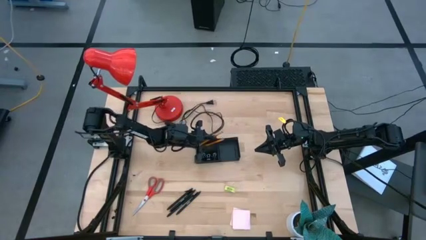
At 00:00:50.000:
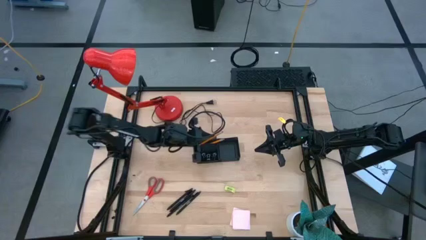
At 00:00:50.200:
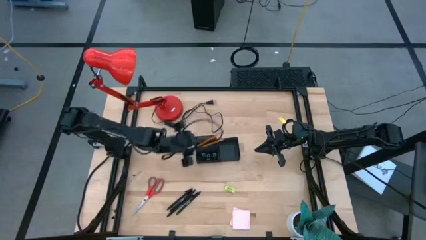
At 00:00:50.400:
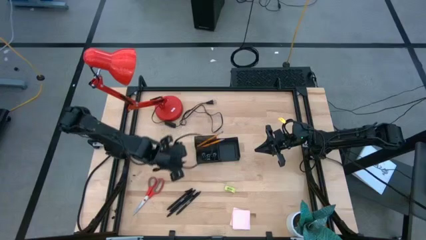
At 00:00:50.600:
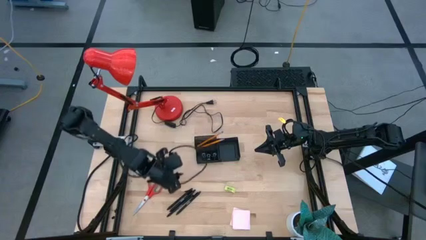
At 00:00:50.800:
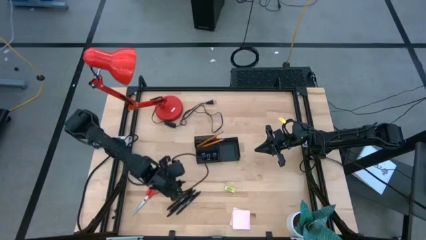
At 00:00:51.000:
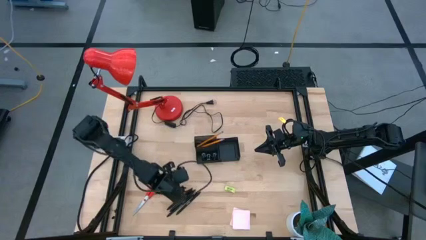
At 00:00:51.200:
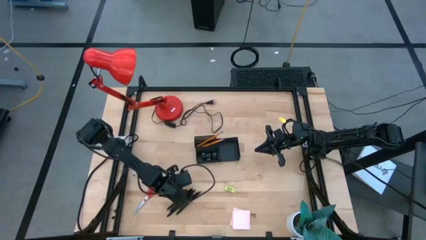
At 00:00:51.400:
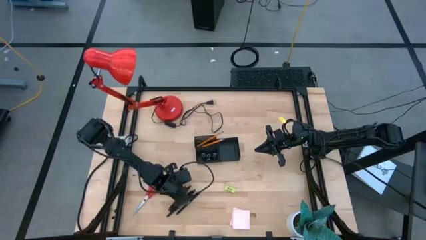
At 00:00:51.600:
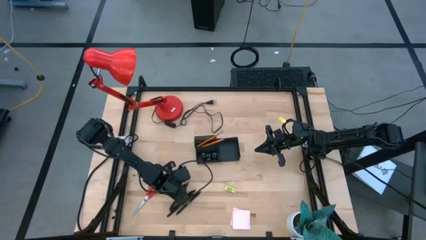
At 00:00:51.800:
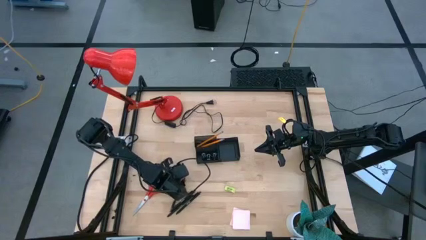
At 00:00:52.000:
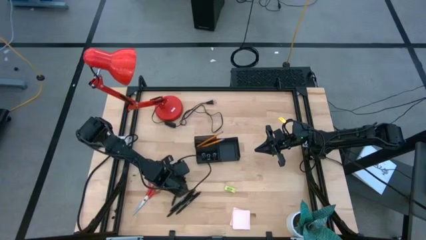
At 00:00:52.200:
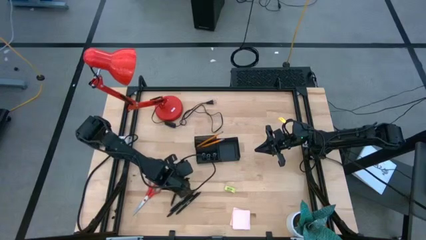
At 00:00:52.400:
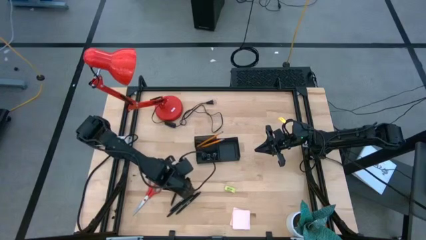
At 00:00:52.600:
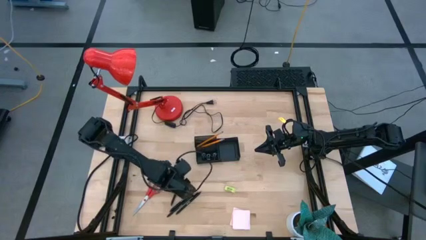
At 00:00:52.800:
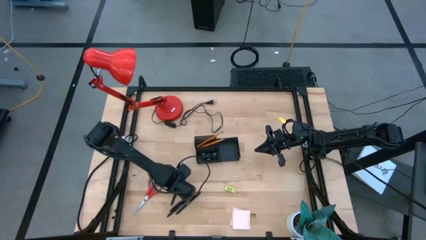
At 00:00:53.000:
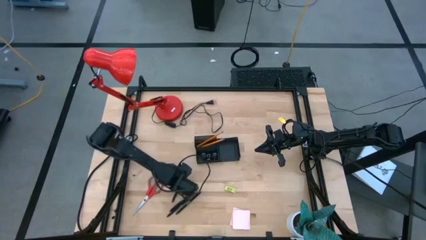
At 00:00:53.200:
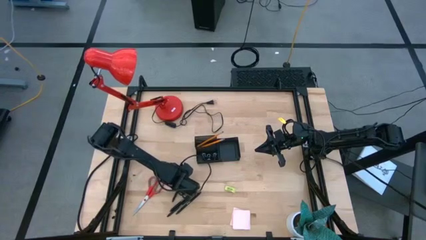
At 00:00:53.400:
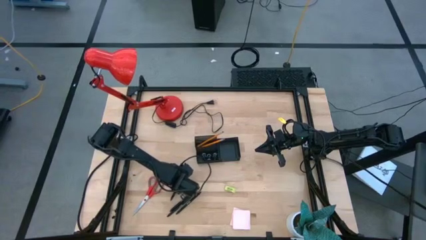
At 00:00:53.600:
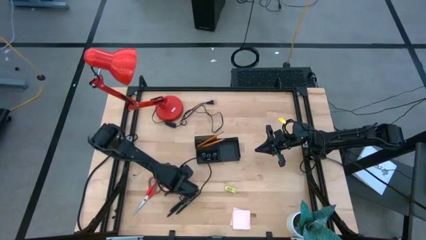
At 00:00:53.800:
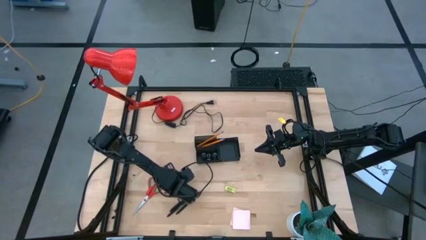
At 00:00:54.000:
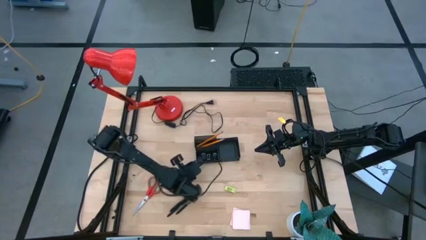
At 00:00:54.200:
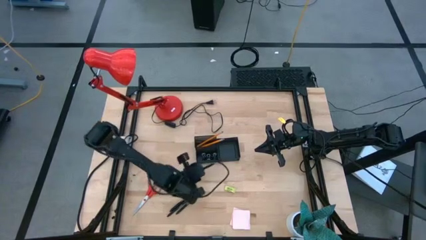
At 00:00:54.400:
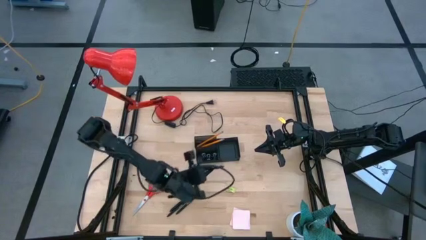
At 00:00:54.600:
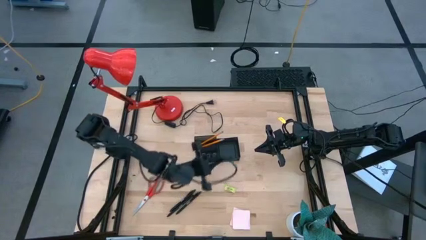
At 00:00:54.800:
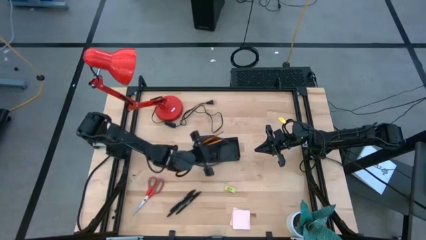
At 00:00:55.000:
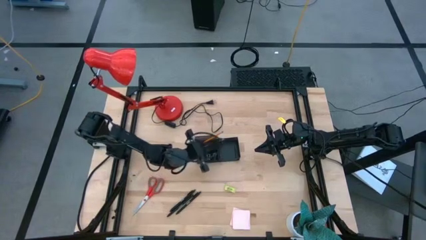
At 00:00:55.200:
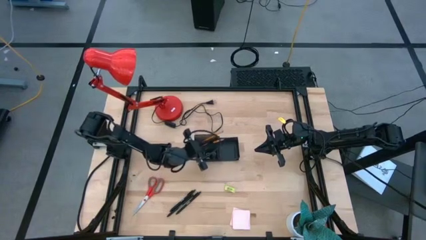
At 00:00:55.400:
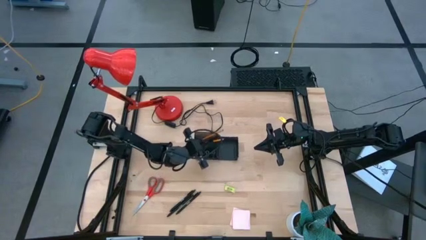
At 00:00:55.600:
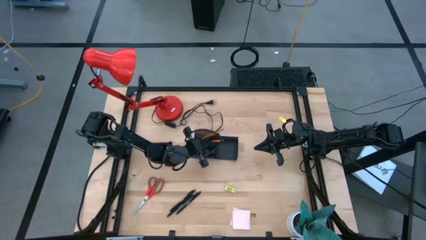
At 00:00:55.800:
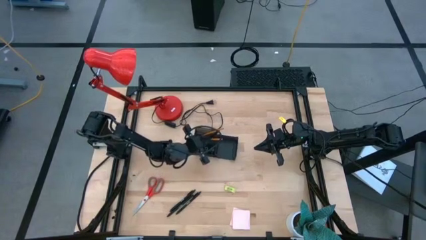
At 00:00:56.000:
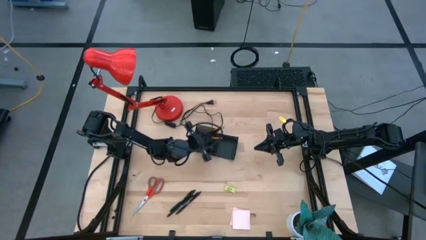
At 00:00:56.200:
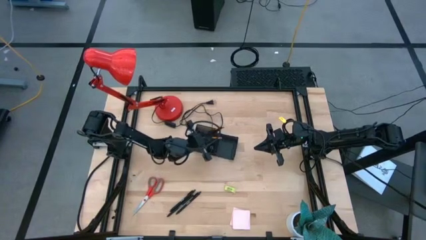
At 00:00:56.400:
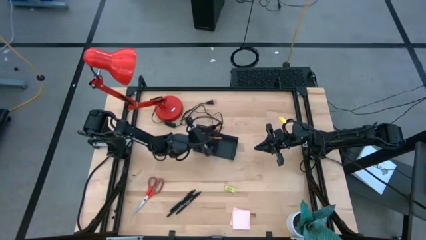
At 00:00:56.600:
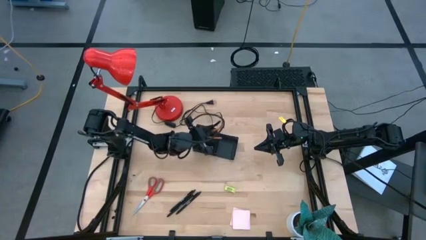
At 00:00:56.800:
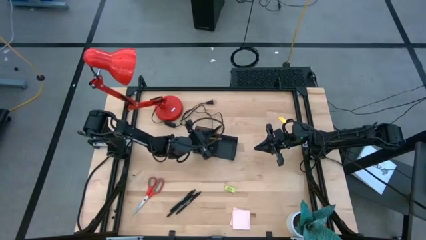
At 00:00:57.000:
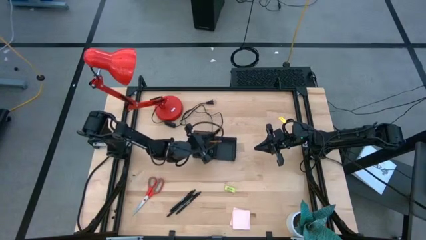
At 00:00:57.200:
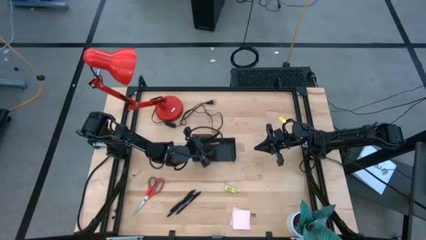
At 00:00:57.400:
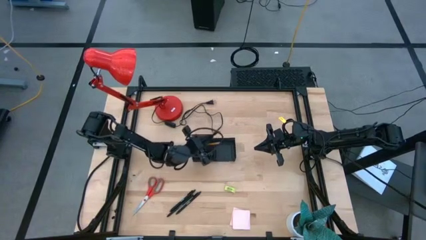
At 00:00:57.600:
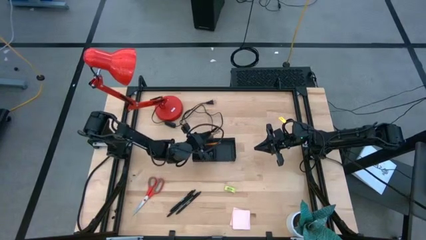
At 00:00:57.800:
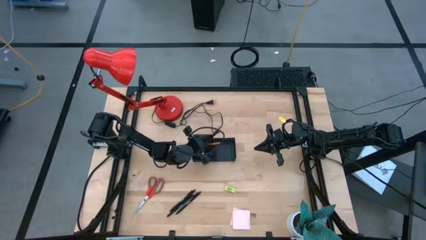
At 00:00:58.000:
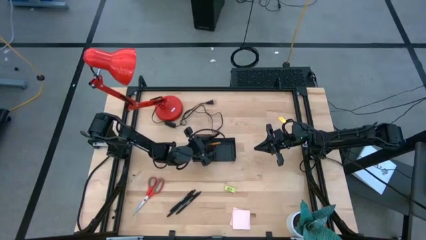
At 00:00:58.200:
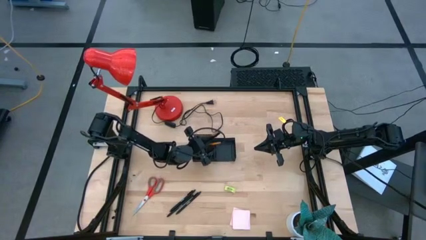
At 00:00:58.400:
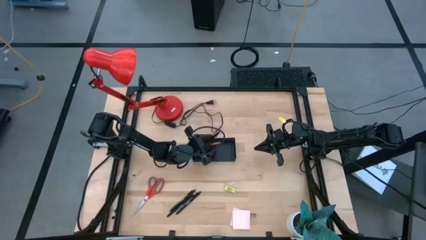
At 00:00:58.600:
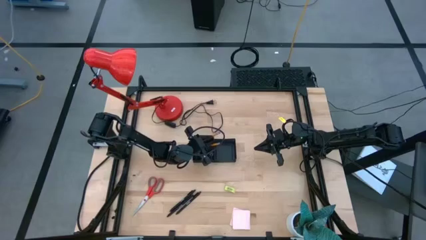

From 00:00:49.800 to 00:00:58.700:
Task: Pick and place office supplies into organizer
Put the black pen into the desk organizer

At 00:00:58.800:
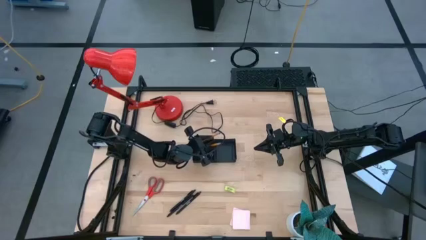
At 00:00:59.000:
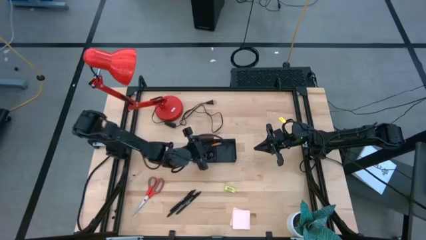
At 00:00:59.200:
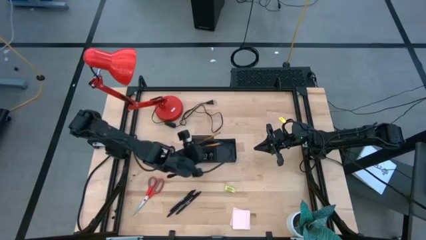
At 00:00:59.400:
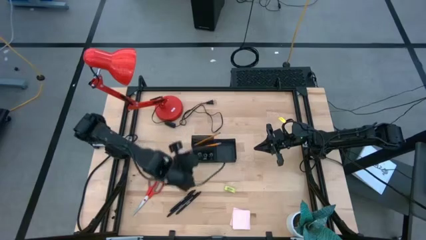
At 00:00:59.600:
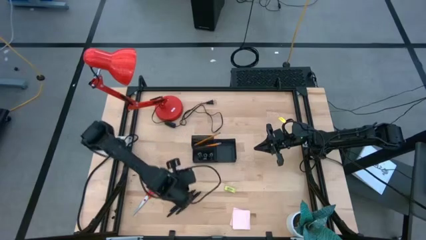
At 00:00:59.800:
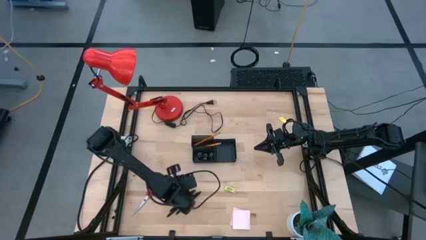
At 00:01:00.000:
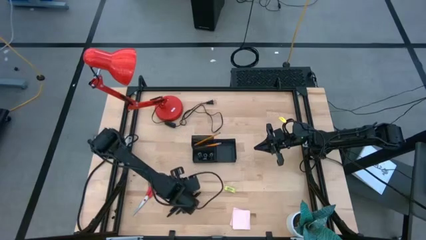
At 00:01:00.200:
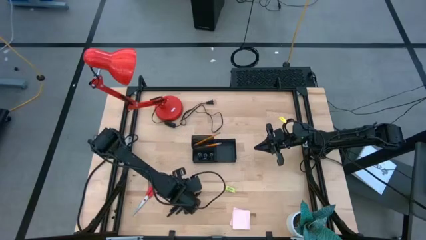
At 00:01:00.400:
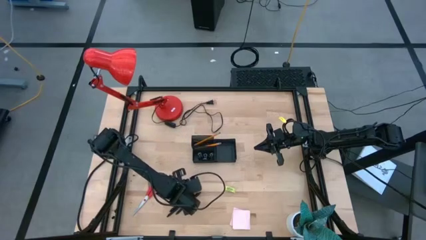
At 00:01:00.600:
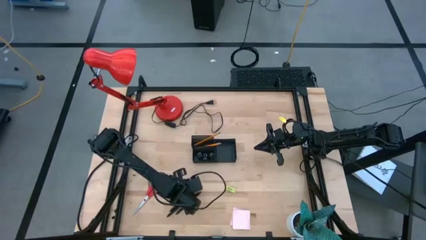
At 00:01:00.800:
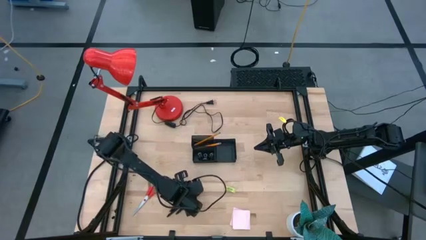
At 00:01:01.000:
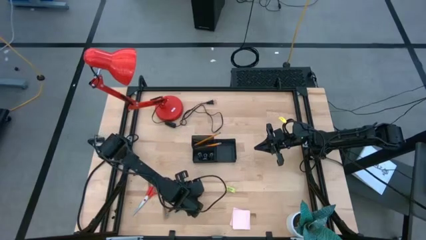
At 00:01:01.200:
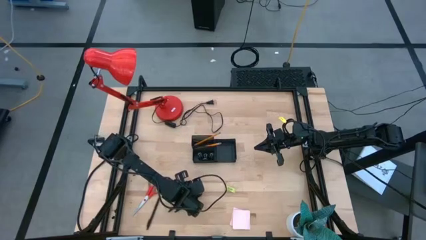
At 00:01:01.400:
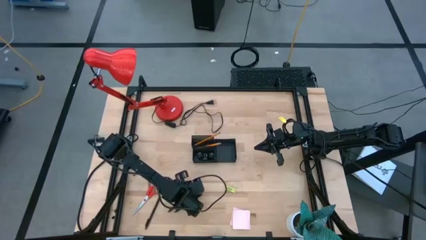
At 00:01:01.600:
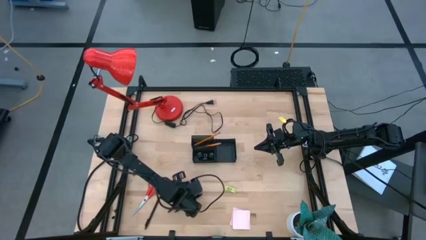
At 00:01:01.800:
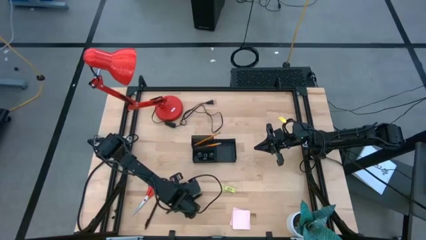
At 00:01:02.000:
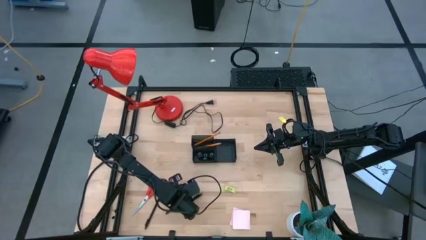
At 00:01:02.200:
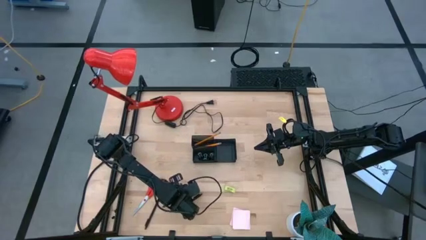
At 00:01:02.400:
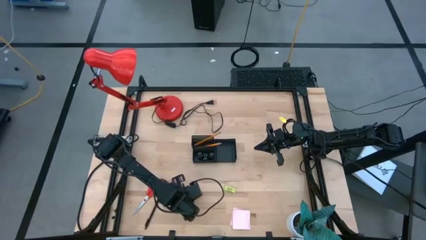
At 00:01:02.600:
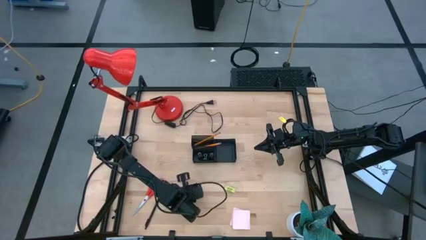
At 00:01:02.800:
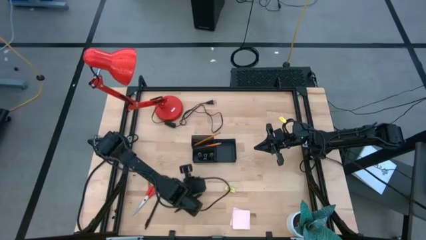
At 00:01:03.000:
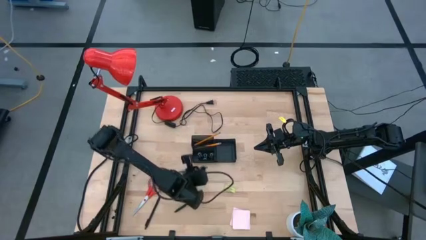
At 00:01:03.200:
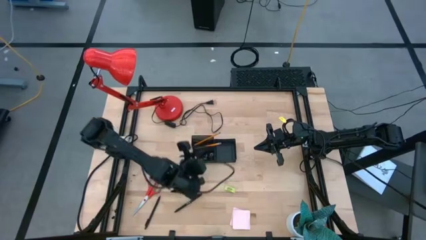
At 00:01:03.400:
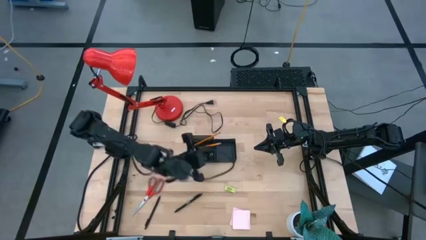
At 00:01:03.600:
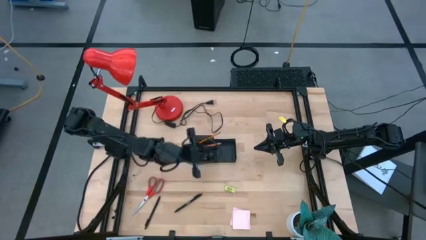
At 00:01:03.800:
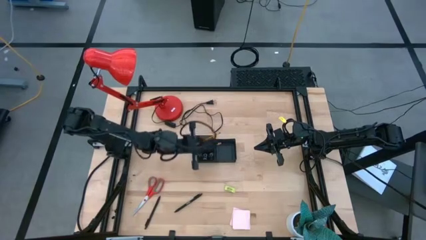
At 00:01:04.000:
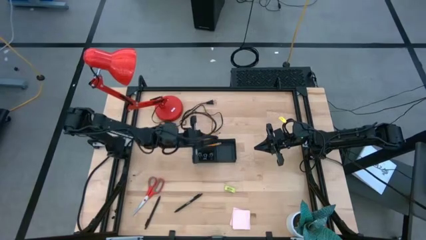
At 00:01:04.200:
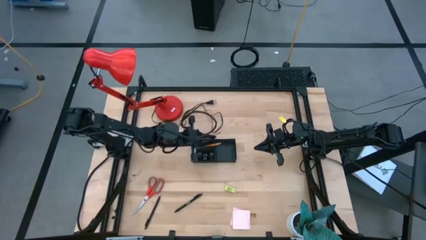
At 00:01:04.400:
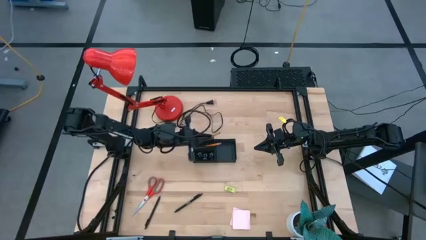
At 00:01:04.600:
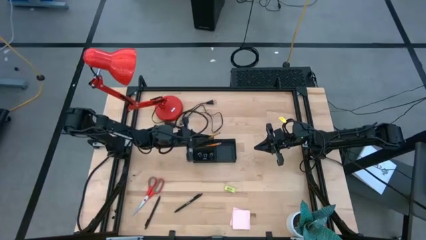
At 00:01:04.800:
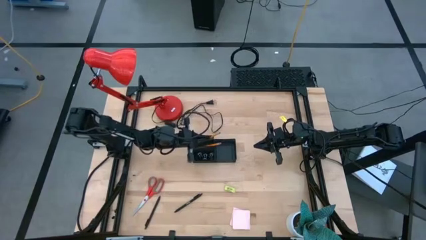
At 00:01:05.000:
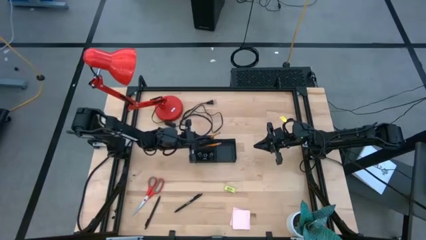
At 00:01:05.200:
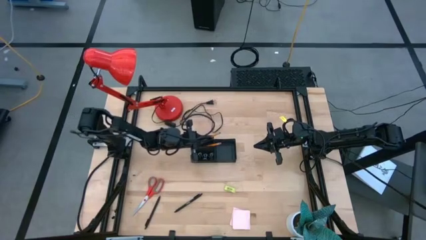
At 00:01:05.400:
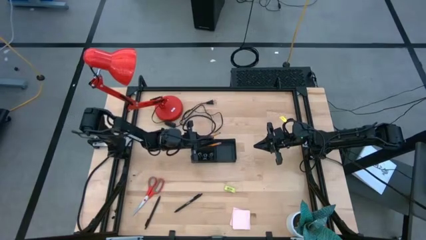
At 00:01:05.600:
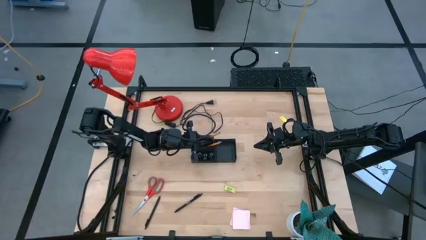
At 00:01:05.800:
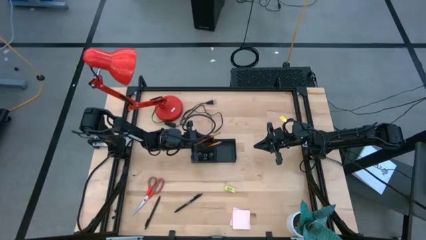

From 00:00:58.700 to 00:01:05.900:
Put the black pen into the desk organizer
